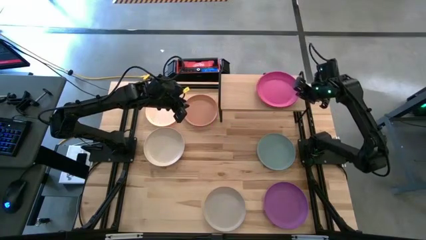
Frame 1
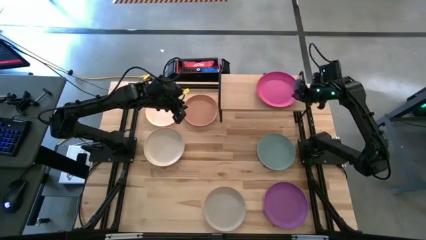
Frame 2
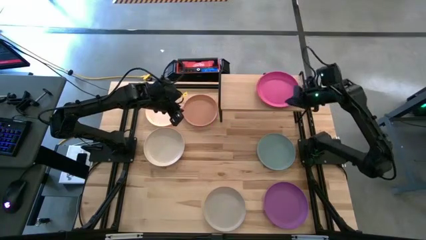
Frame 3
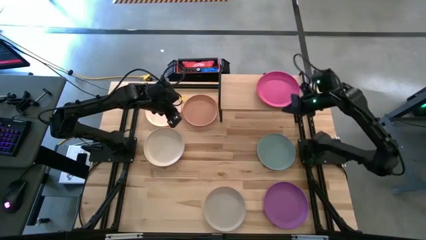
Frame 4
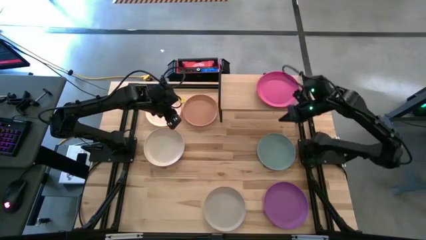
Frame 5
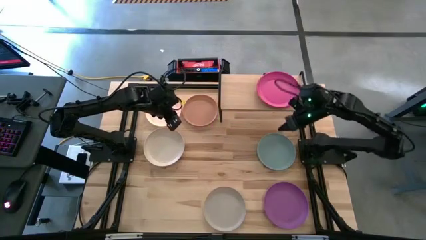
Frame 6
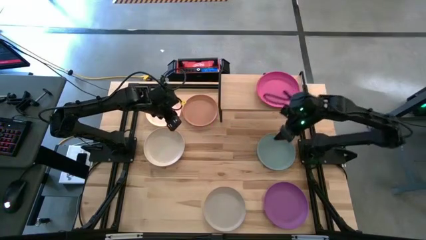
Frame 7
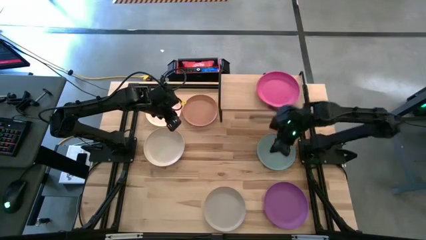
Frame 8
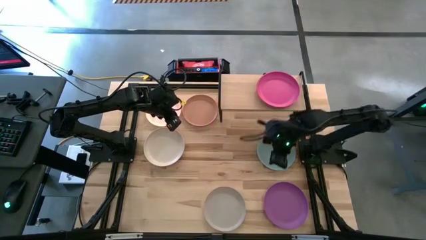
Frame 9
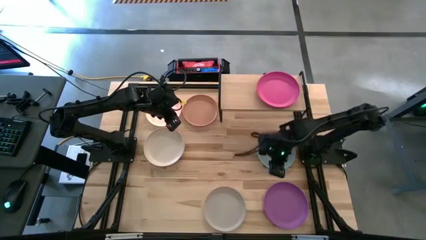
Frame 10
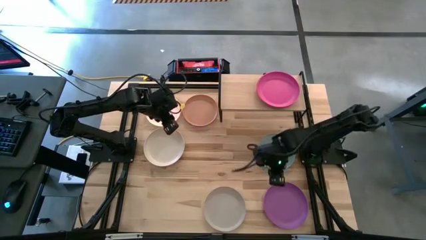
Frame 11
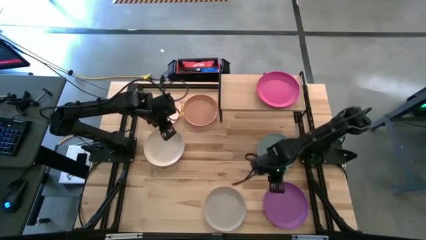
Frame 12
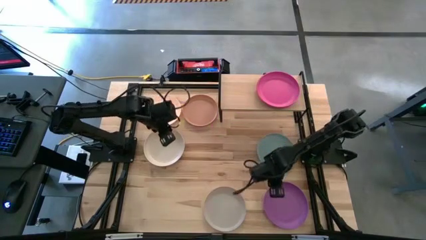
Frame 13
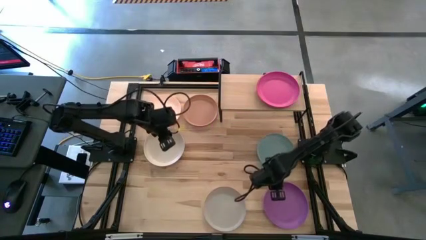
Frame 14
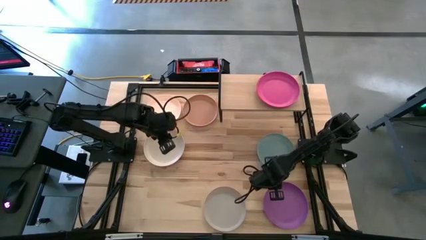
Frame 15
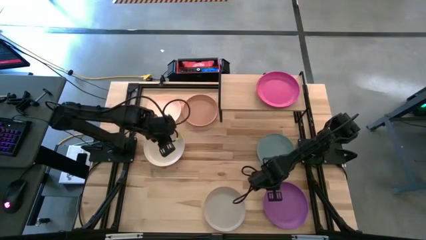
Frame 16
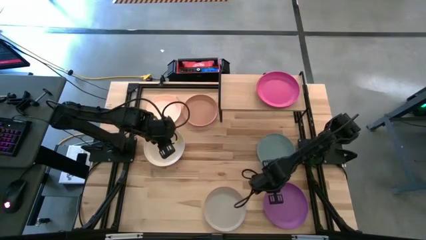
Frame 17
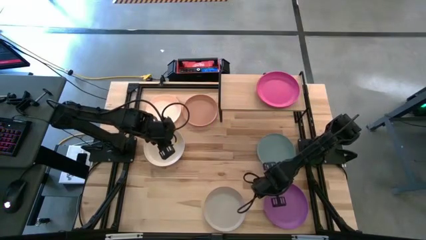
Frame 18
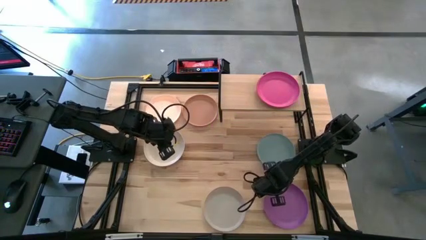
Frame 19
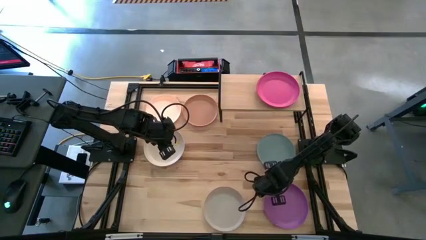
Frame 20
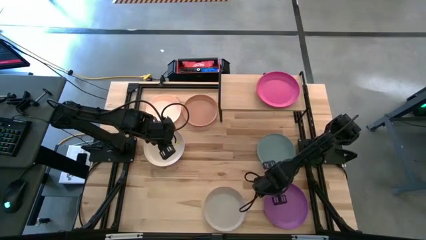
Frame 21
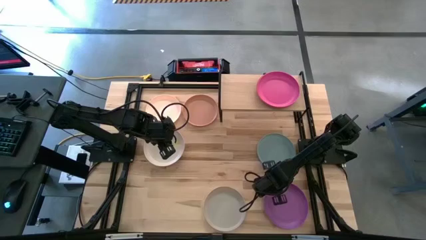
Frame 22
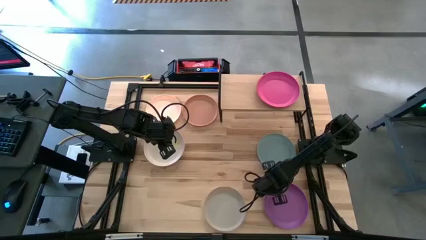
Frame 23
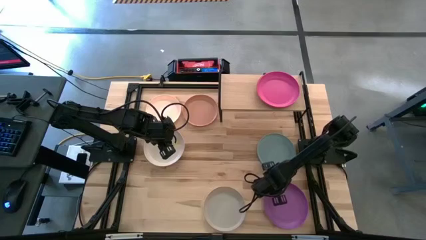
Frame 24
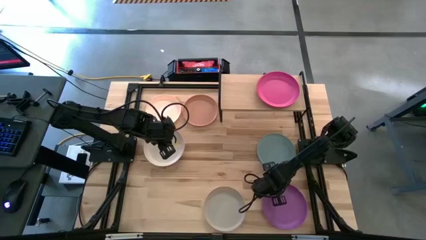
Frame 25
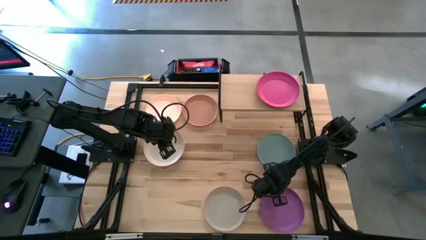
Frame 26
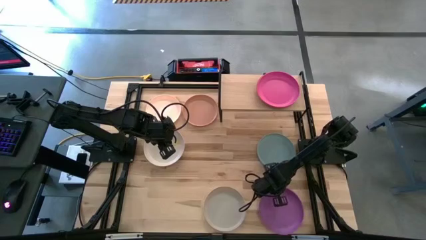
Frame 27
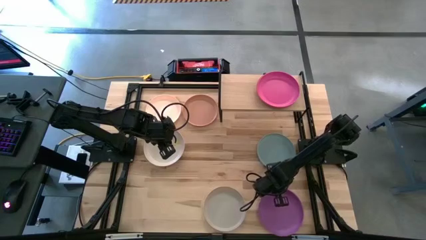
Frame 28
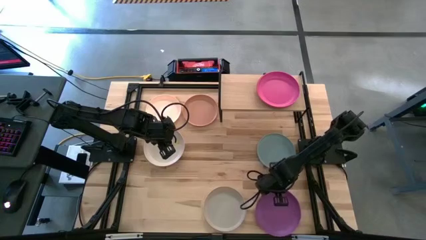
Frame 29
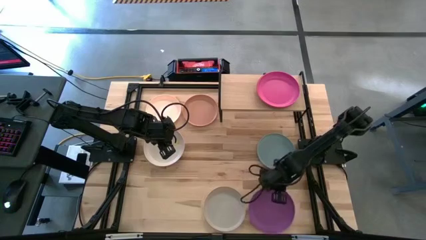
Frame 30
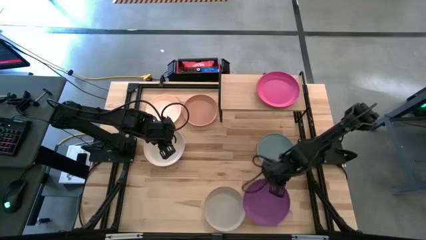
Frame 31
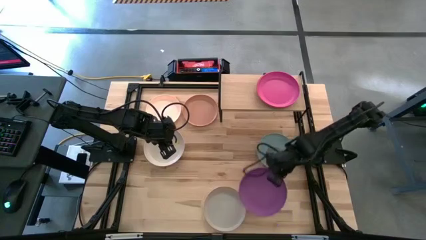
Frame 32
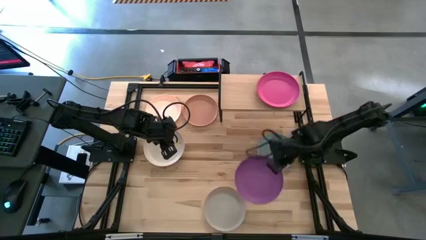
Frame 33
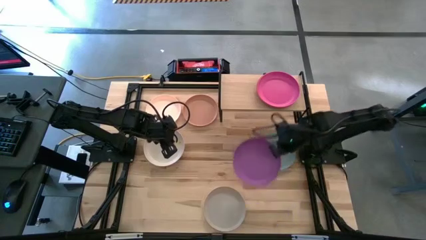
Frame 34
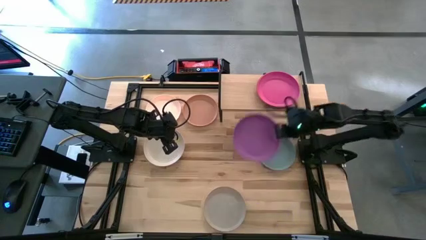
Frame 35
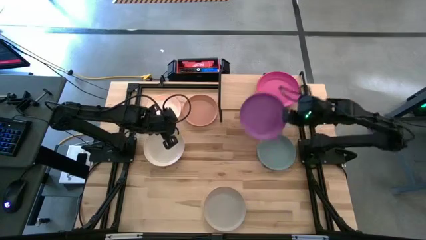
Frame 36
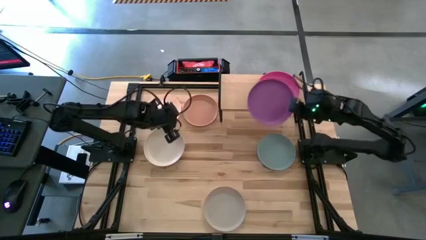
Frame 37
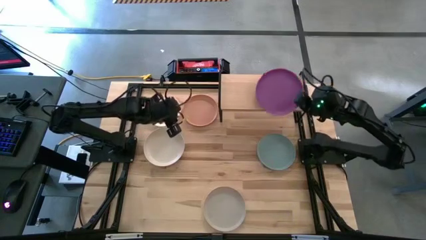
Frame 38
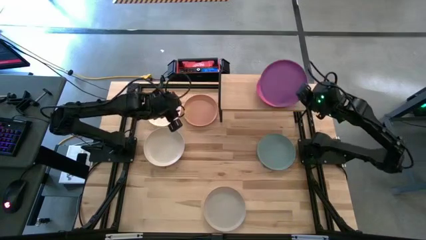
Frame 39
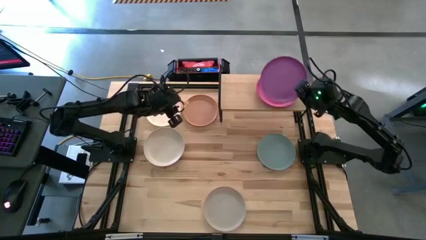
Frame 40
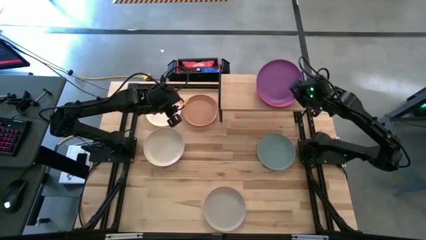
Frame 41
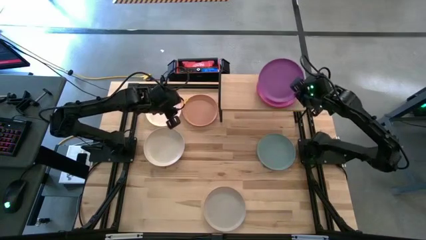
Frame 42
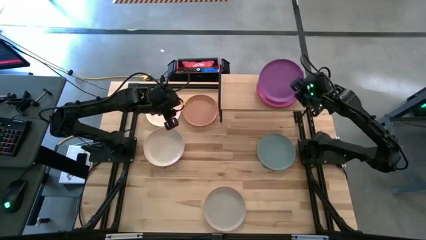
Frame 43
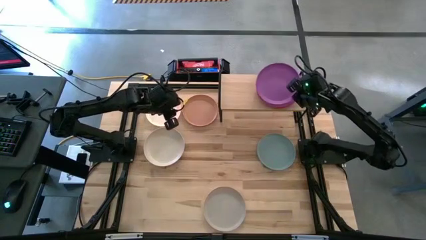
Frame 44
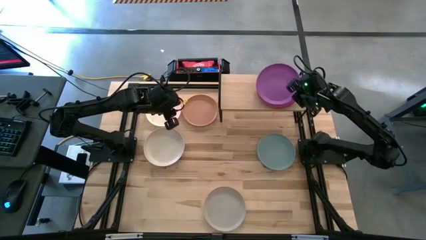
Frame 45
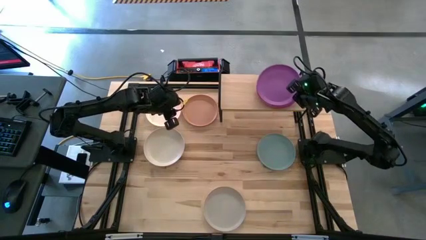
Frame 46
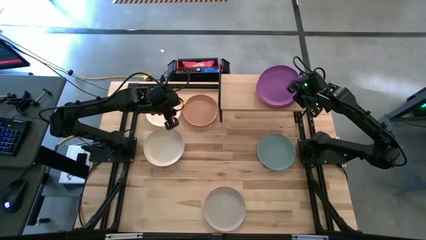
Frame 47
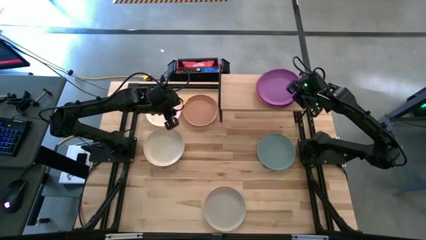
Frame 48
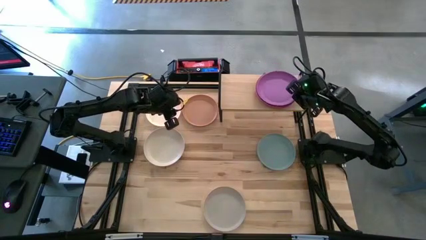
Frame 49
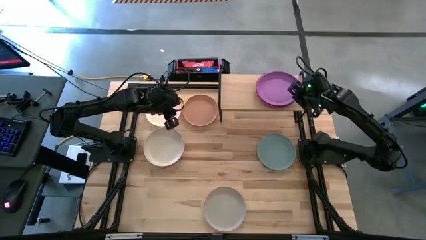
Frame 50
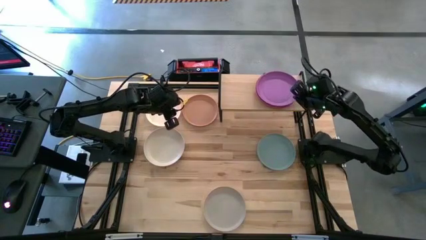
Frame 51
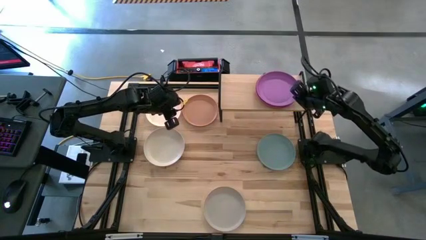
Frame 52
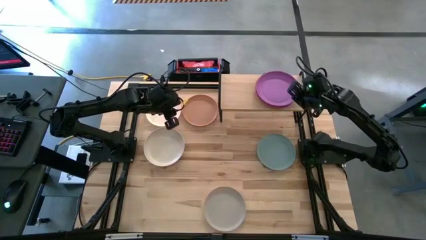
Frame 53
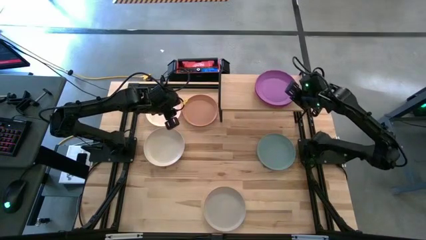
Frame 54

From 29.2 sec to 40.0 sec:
Task: Place and stack plates onto a shelf
Stack the purple plate on top of the pink plate on the shelf
